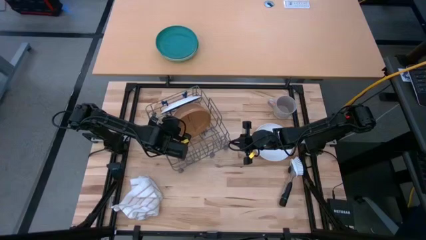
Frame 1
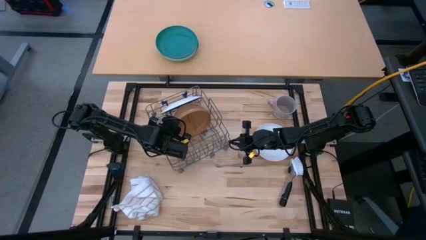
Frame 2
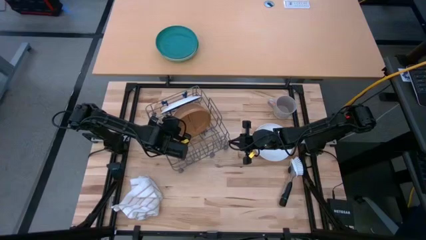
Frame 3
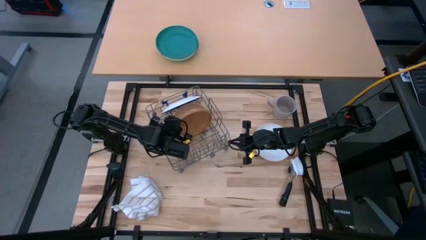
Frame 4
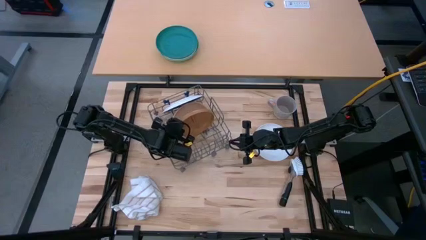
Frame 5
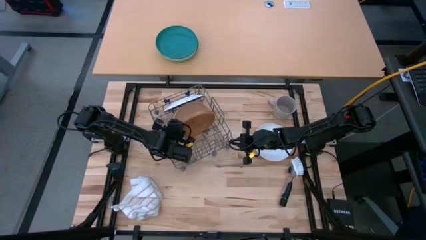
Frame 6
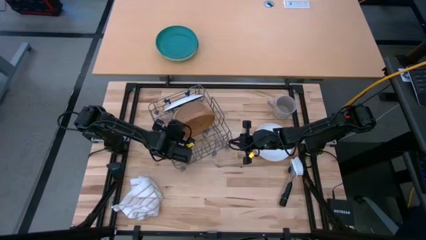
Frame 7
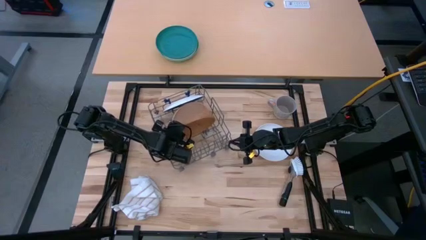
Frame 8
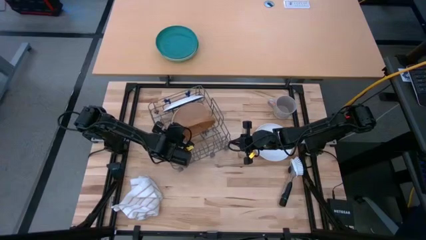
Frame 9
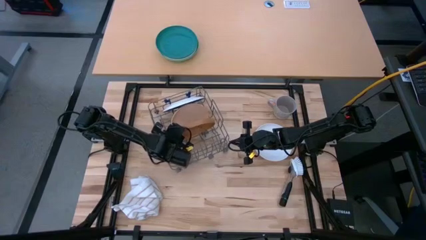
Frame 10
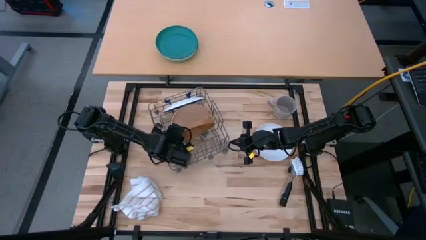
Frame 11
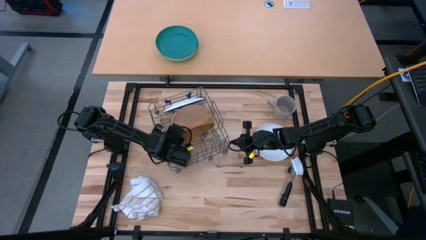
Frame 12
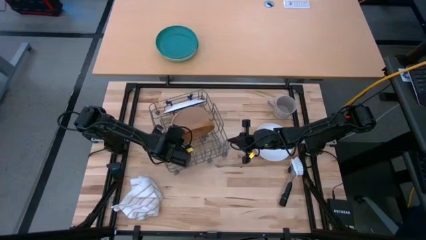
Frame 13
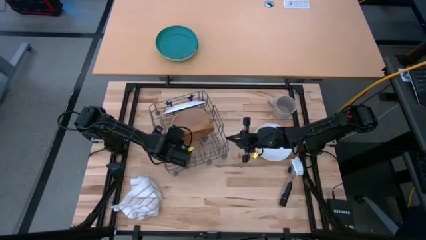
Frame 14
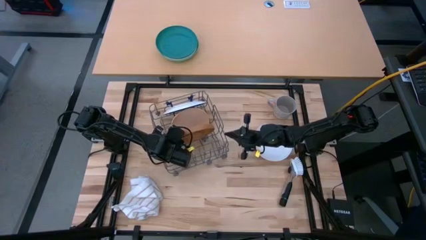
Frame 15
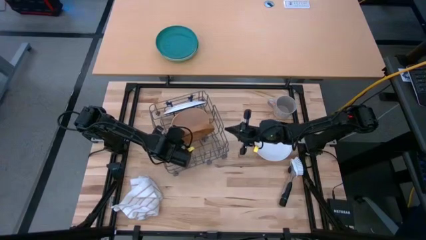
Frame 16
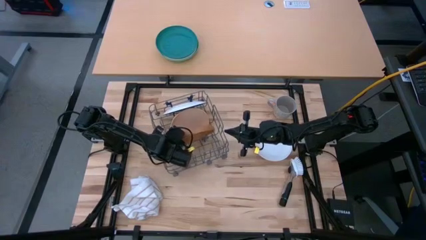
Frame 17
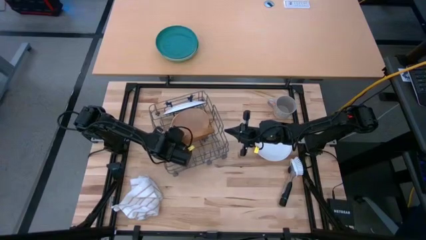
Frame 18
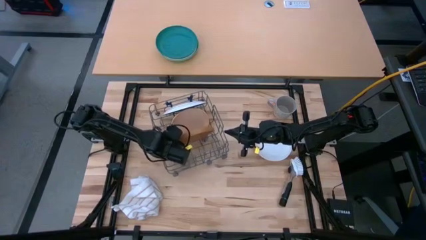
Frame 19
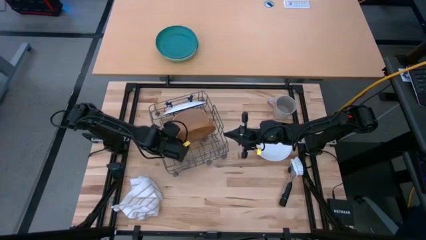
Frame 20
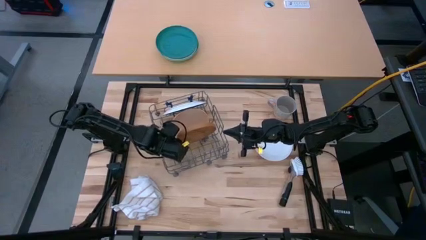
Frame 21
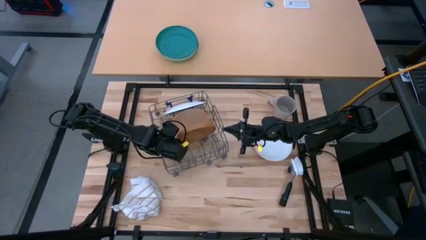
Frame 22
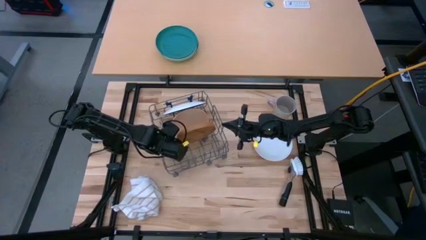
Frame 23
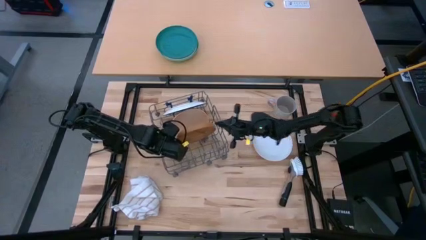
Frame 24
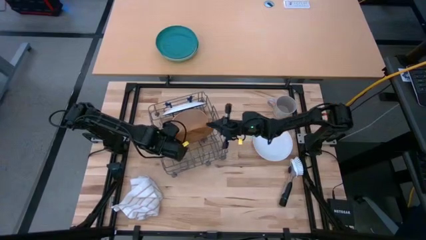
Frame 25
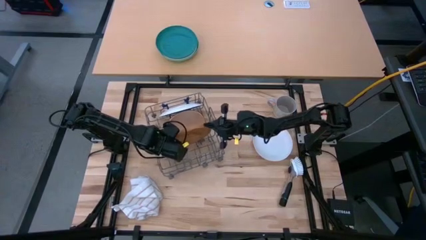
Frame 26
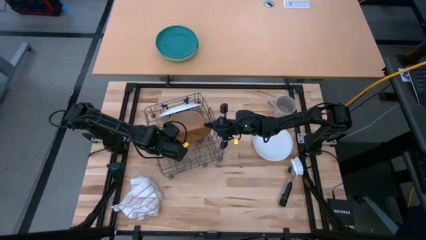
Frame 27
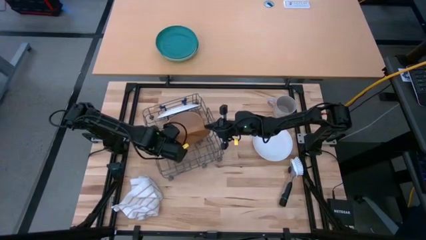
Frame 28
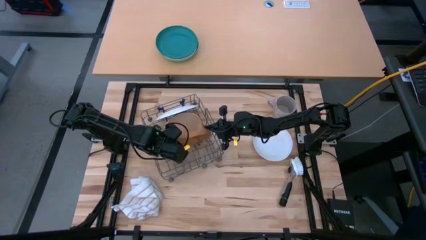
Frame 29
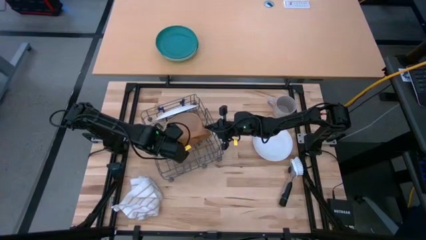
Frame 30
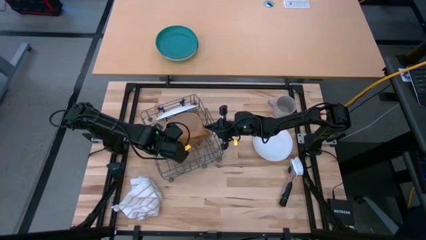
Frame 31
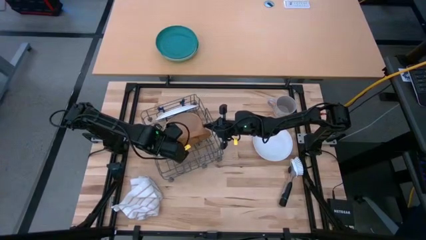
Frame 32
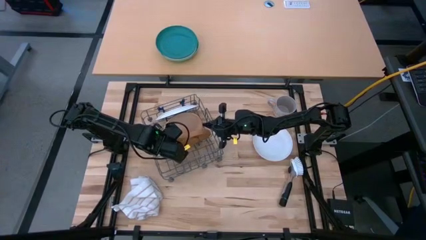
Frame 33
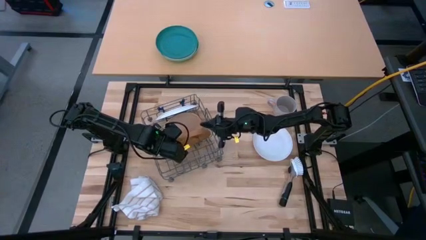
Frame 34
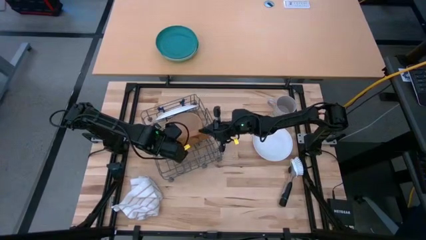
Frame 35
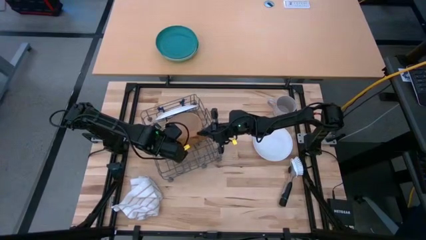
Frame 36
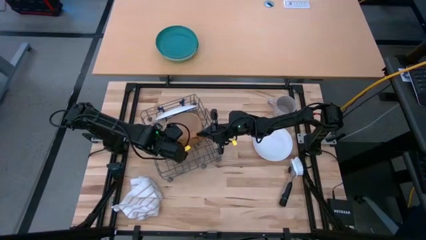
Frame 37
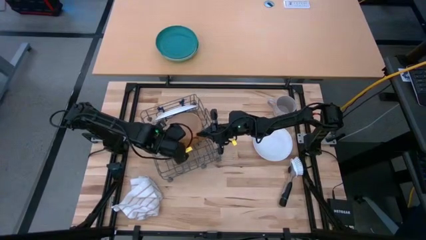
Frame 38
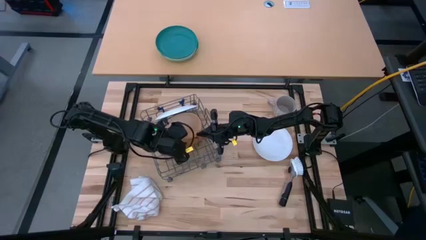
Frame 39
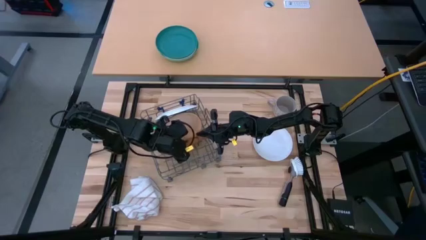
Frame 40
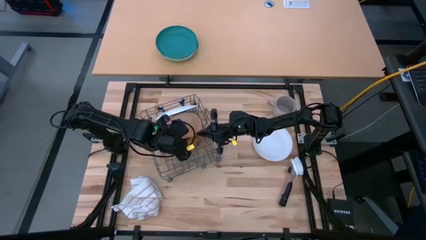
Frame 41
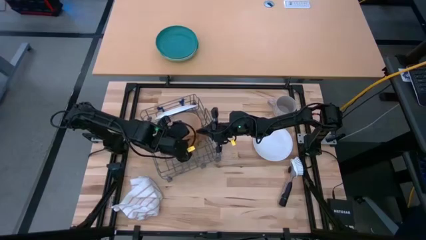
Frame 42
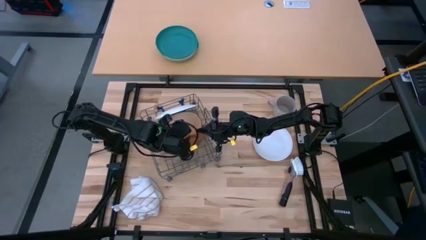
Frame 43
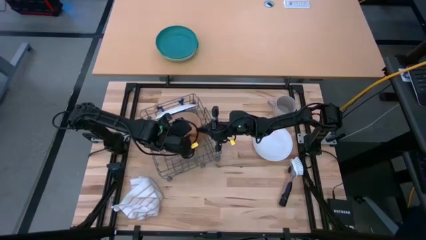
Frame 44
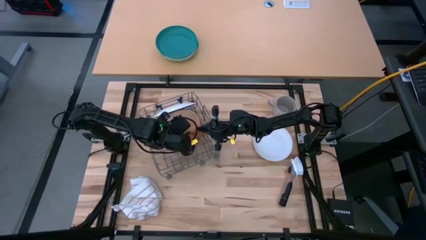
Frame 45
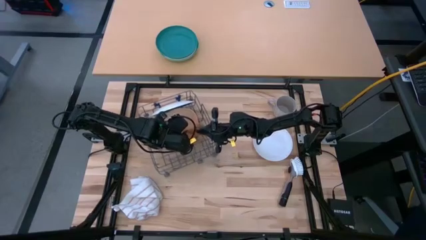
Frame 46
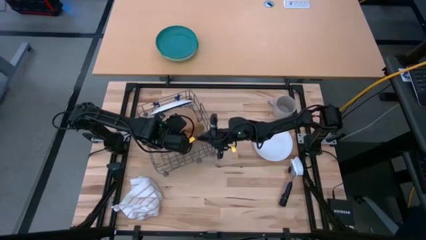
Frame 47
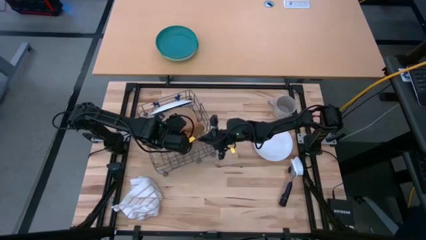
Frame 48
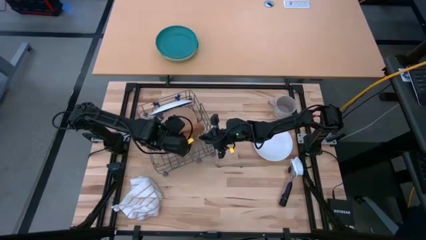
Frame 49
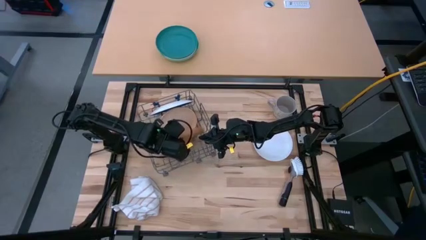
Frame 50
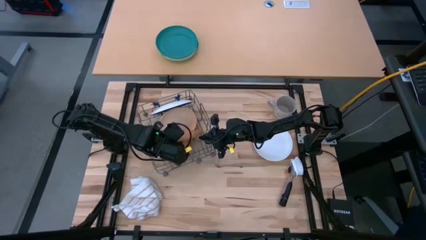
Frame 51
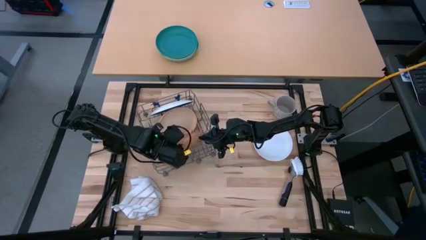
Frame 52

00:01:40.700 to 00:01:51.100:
Task: Sort dishes
Put the brown plate in the dish rack

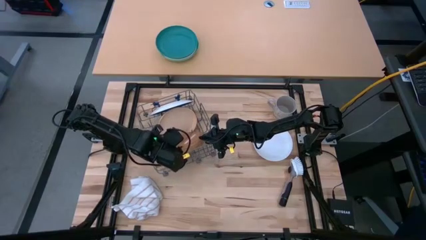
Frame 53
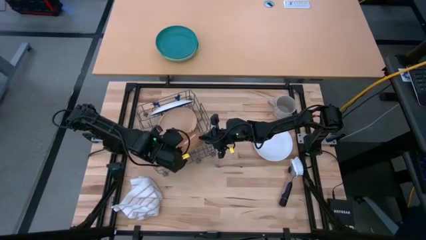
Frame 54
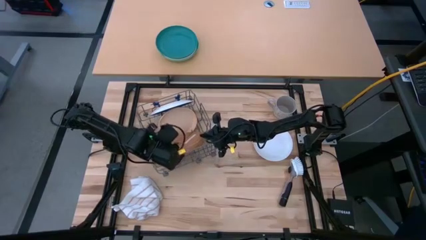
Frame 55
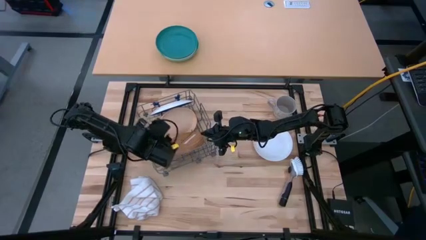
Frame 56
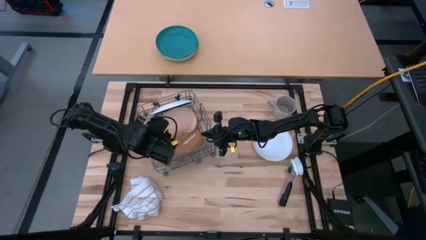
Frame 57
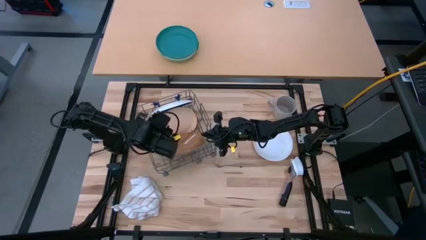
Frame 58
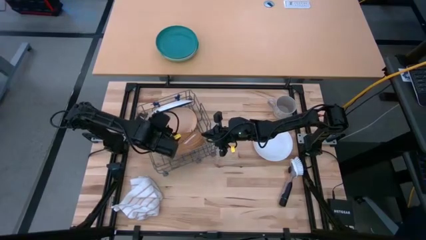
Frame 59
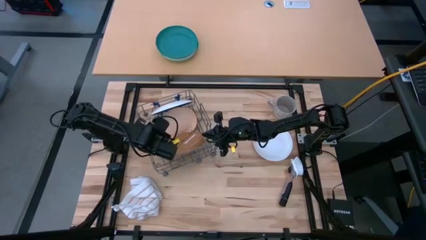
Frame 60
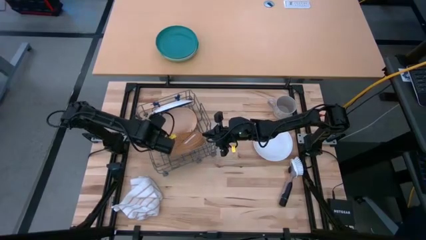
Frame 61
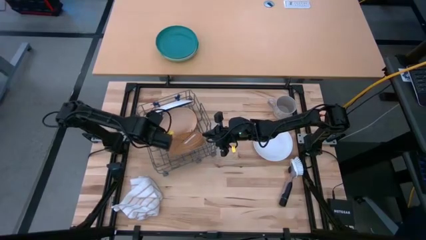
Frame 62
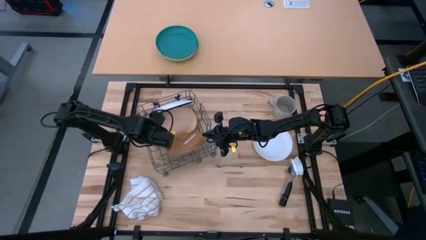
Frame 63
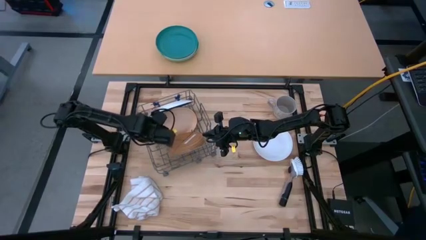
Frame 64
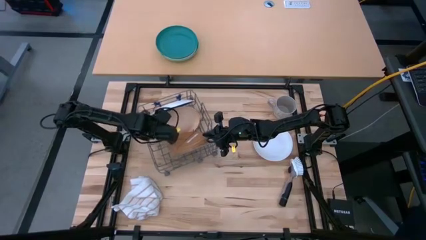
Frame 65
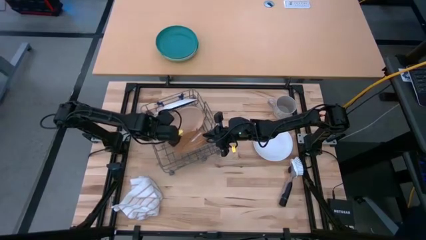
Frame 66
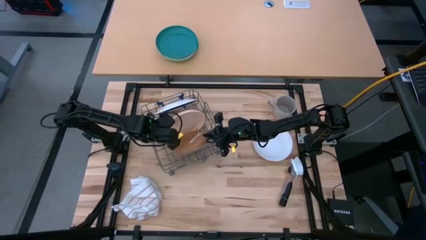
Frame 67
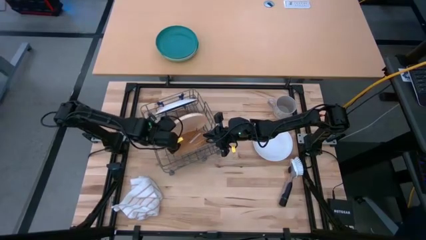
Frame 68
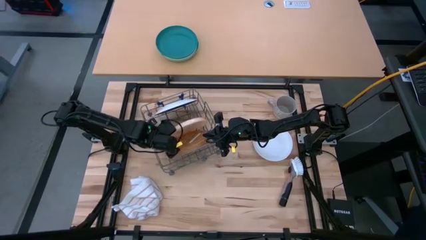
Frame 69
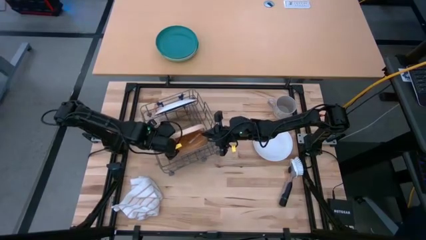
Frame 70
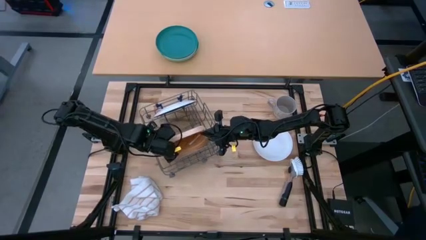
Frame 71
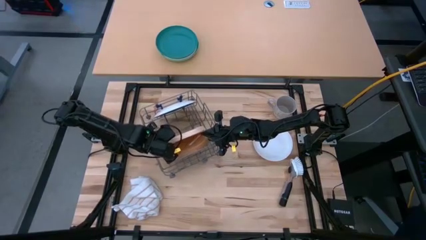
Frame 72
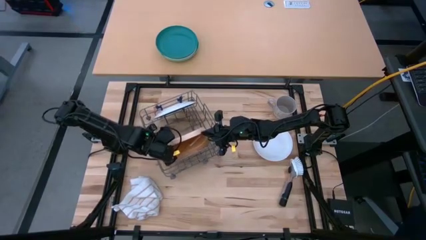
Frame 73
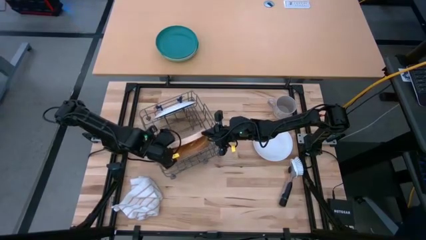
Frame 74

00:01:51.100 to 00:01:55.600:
Adjust the light orange plate

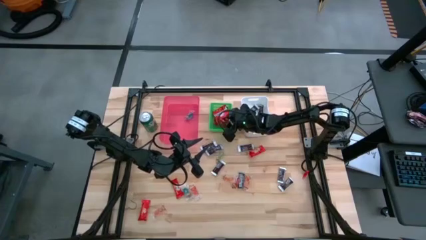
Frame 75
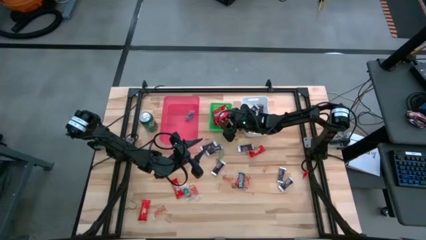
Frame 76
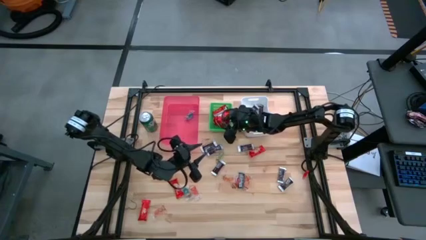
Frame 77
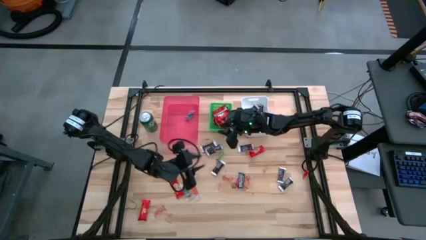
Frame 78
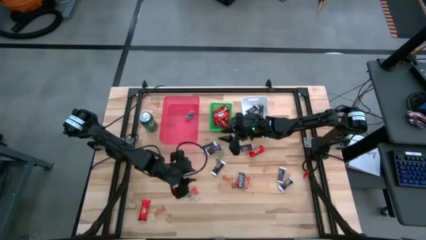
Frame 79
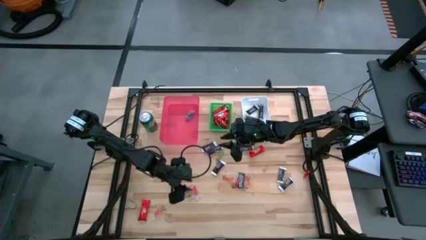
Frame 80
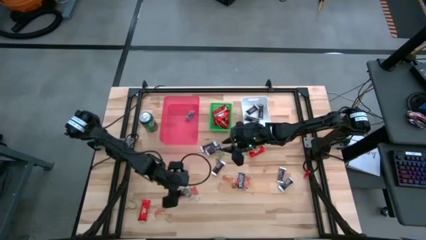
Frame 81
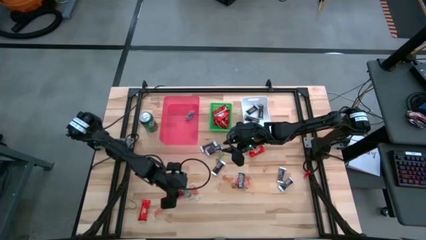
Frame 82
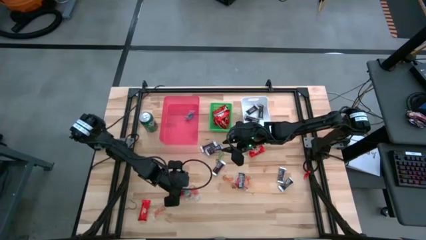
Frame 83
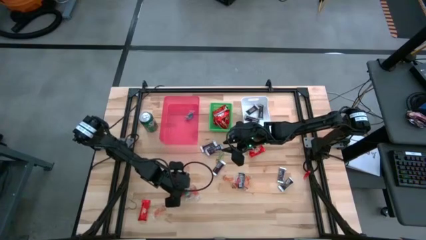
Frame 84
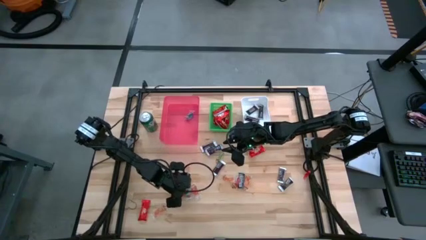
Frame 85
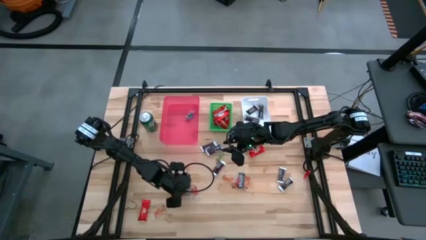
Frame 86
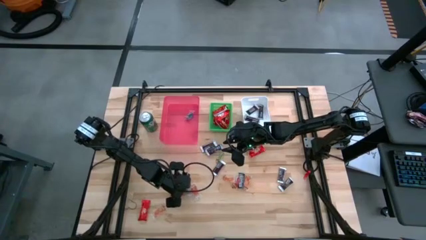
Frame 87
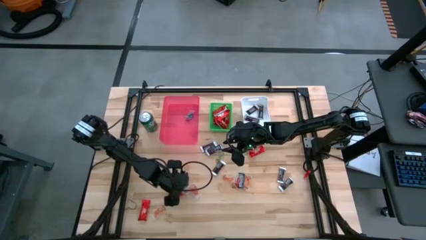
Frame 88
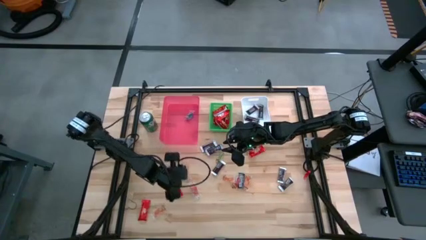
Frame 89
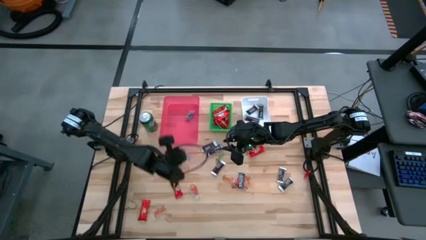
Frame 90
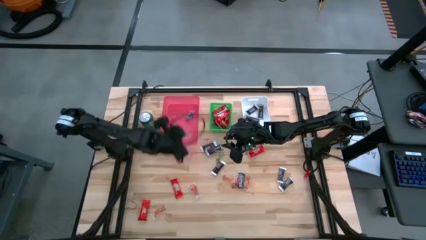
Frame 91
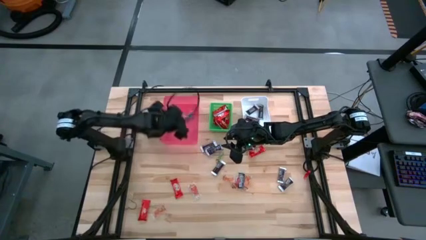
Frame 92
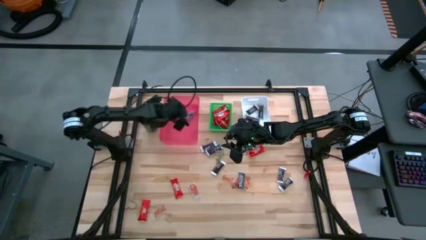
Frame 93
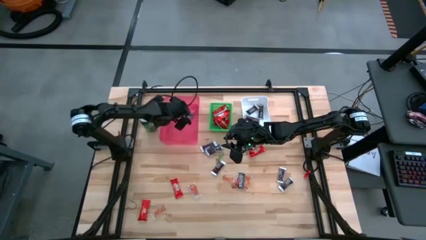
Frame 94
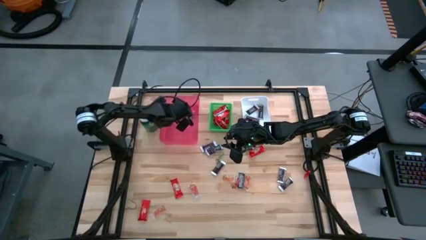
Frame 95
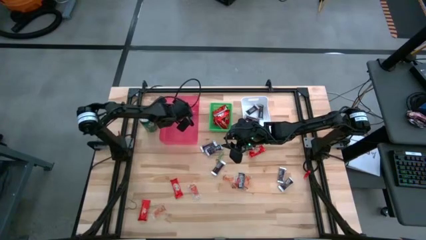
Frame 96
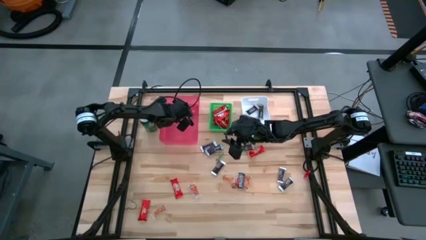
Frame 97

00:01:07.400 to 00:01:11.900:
Task: Sort candy
Put the blue gummy into the red bin
